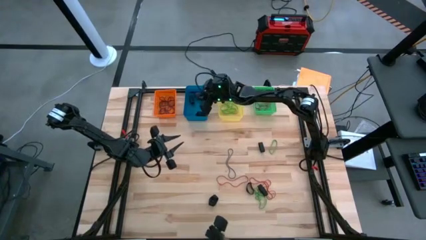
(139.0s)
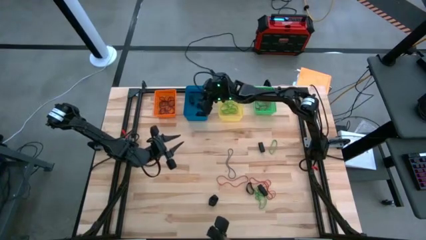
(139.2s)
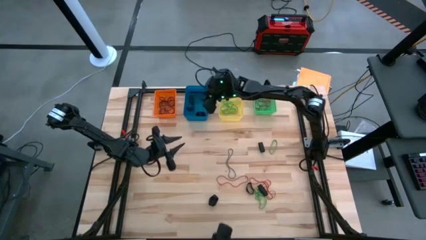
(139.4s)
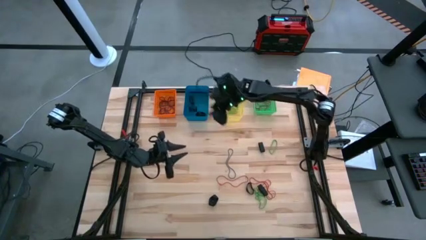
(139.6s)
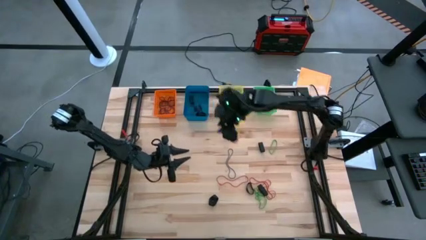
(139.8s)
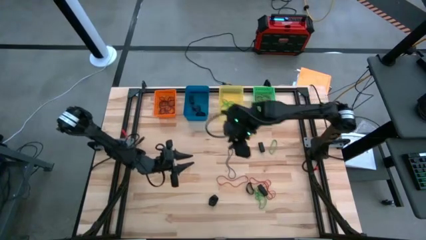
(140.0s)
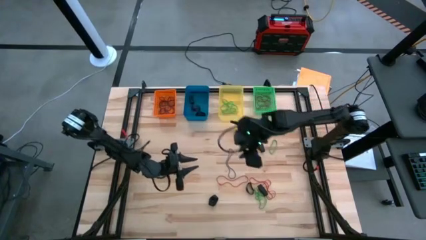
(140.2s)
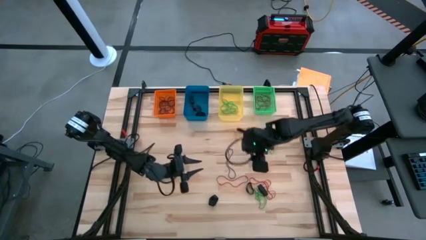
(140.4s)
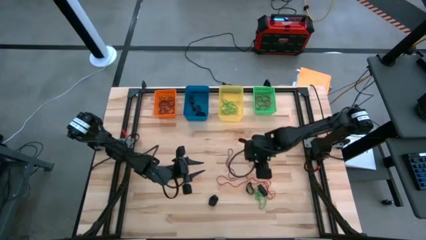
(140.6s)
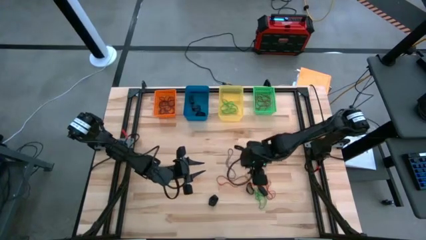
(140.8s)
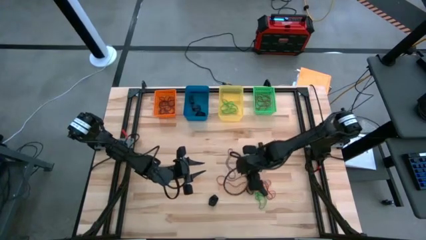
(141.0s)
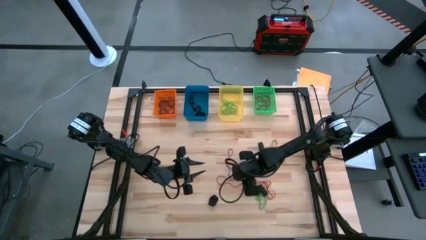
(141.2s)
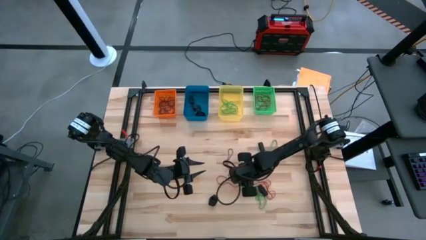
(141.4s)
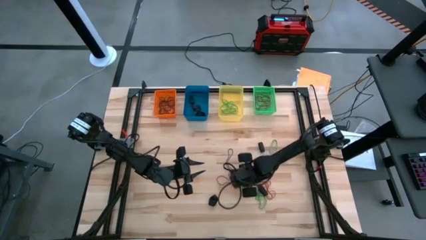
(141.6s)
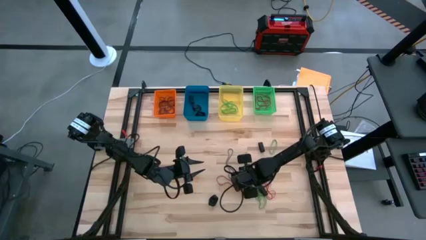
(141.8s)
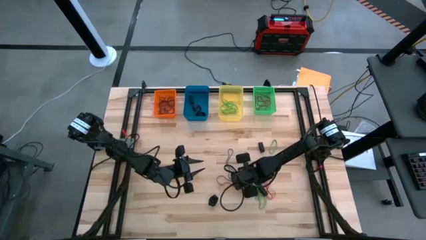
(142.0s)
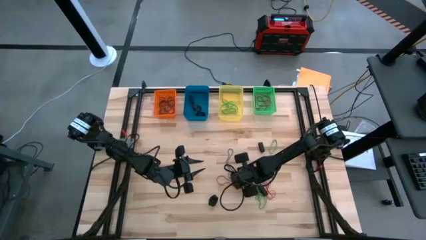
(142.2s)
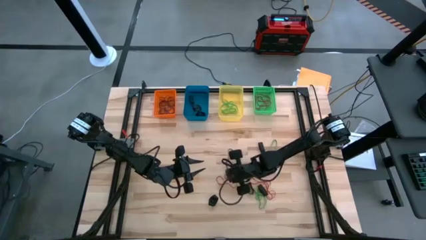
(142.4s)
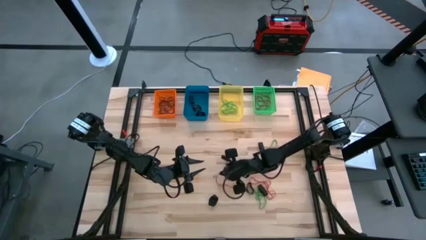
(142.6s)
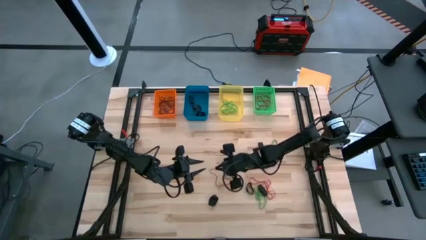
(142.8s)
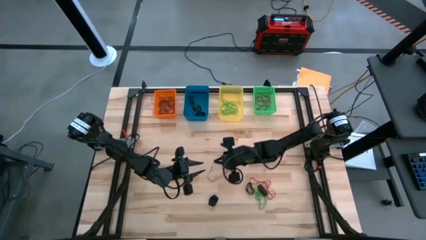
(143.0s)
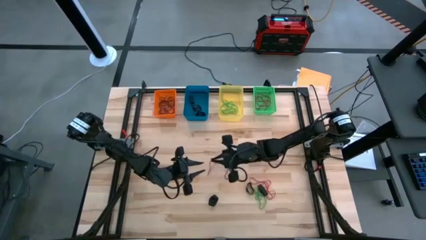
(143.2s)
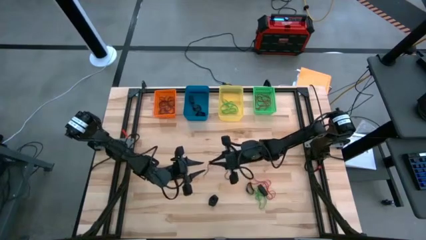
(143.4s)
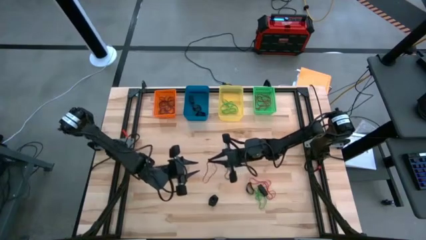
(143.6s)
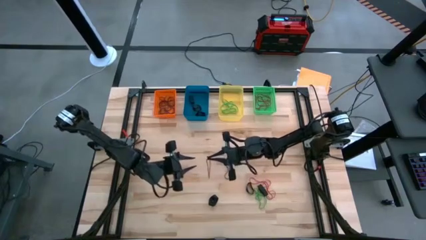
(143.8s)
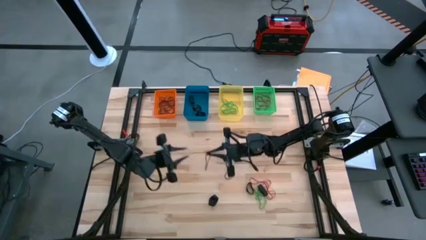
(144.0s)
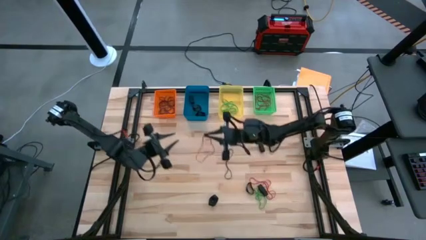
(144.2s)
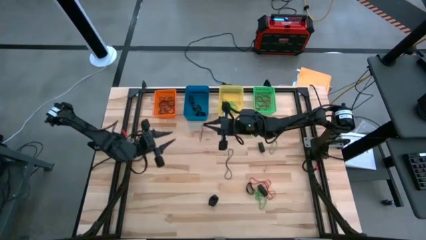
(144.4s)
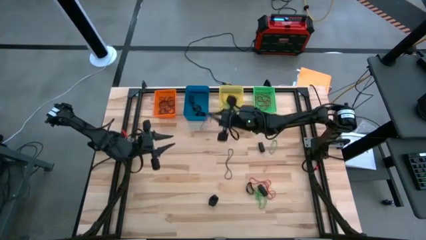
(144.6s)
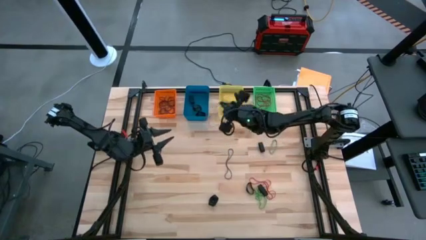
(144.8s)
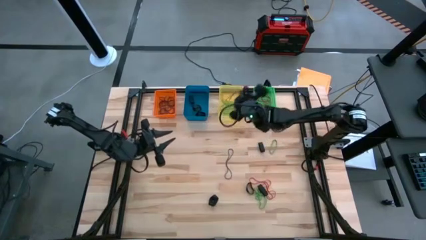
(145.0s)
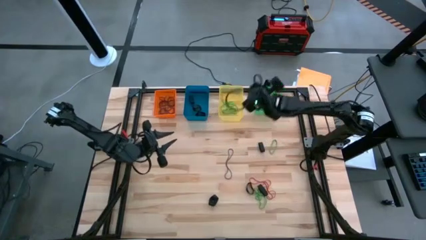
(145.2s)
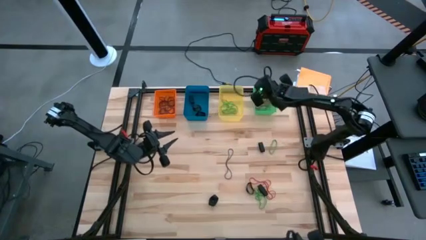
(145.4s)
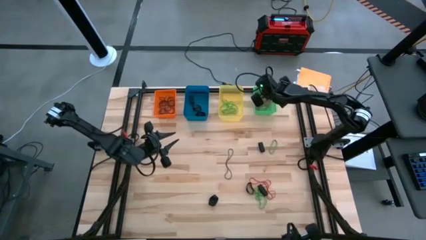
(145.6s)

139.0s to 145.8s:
Task: Sort rubber bands into baskets
Put the red rubber band into the green bin

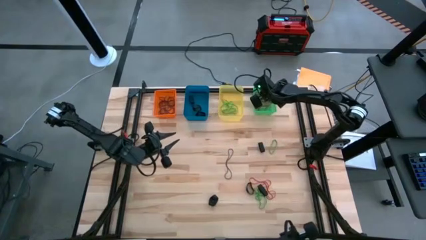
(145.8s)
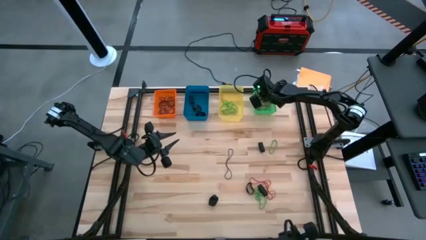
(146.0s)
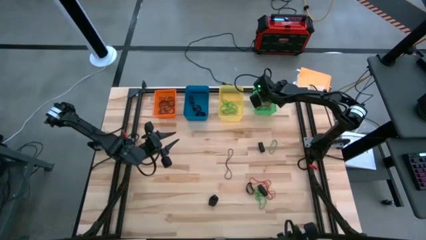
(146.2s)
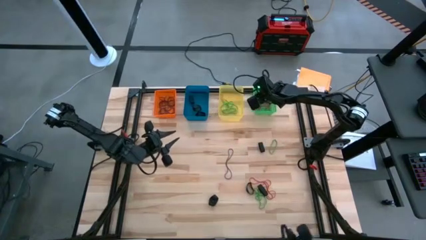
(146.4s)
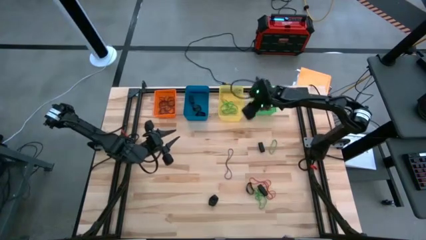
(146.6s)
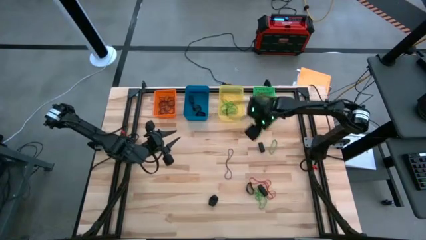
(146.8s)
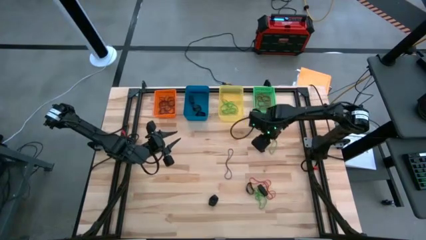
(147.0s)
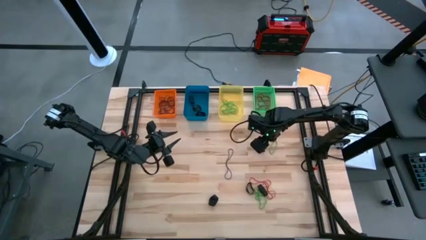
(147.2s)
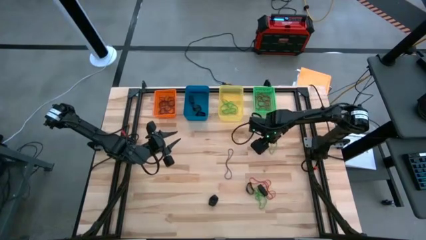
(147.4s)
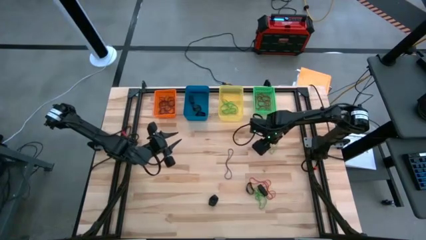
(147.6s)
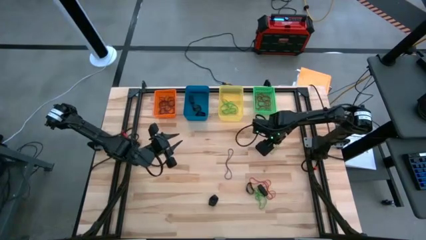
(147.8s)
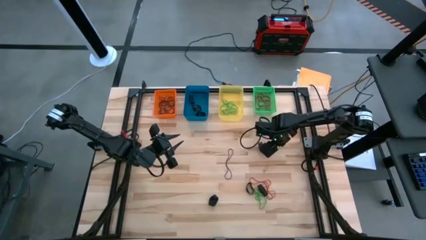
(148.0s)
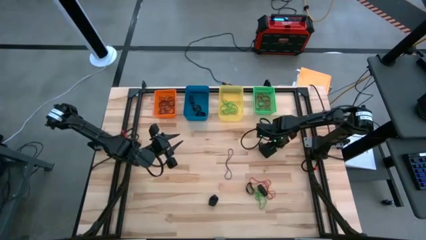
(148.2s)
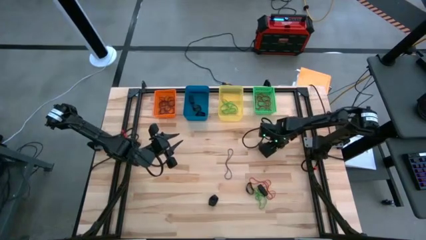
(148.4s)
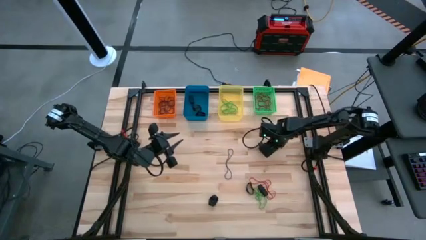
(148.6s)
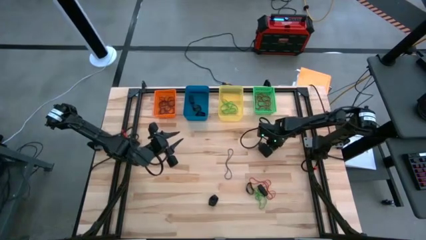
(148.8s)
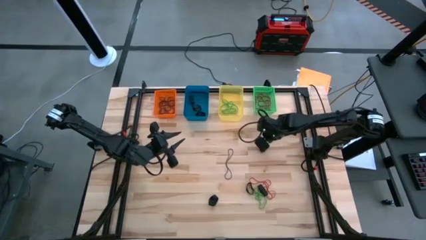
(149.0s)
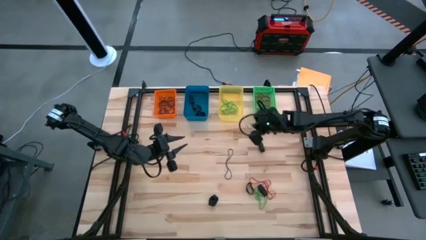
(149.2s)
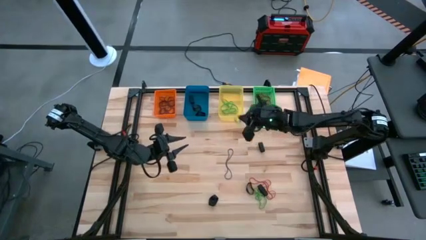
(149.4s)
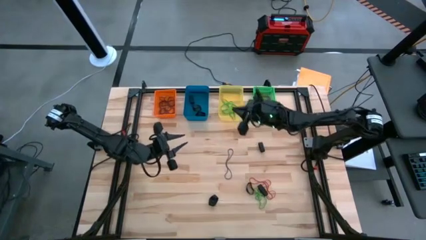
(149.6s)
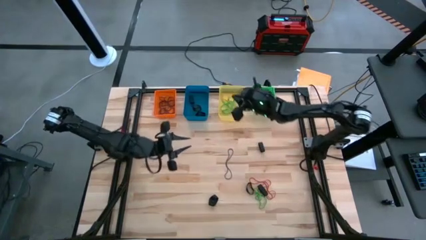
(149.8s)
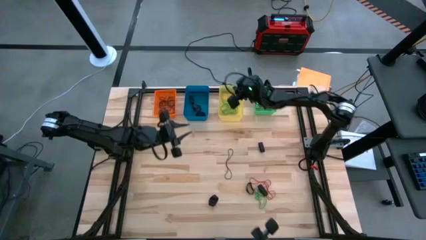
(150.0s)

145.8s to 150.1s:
Put the green rubber band into the yellow bin

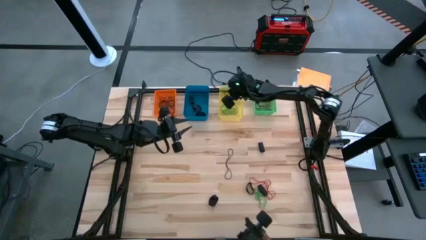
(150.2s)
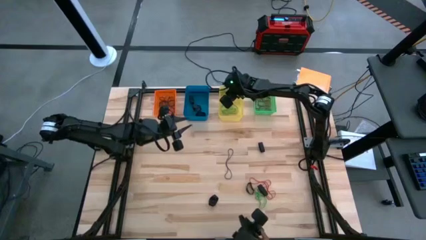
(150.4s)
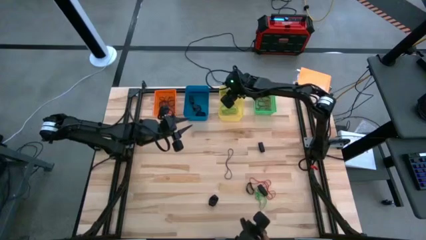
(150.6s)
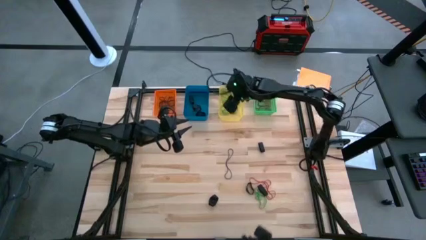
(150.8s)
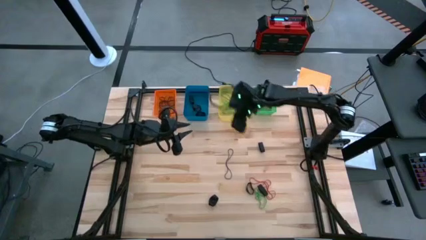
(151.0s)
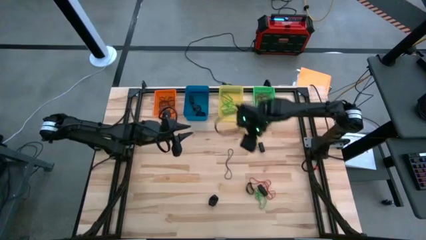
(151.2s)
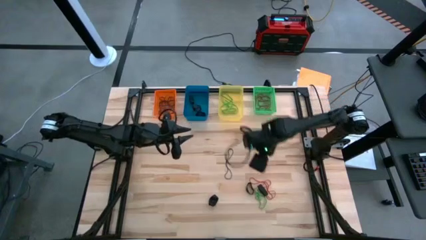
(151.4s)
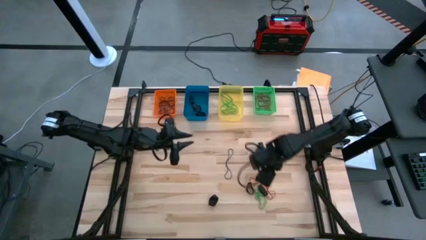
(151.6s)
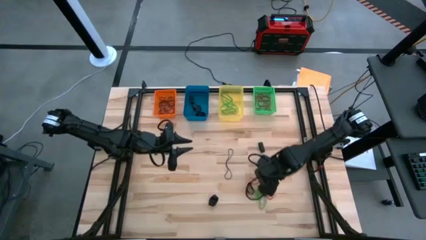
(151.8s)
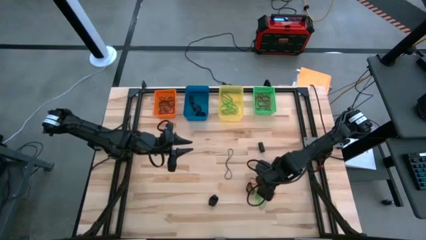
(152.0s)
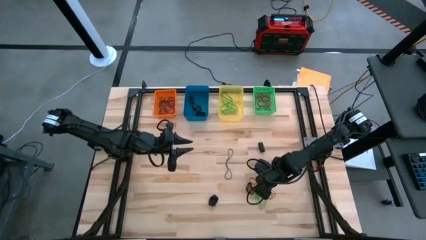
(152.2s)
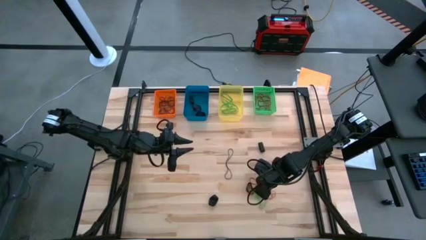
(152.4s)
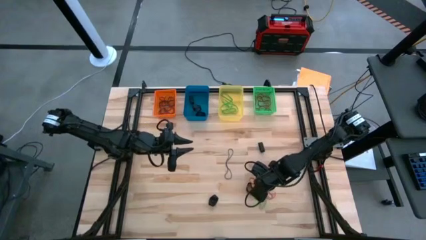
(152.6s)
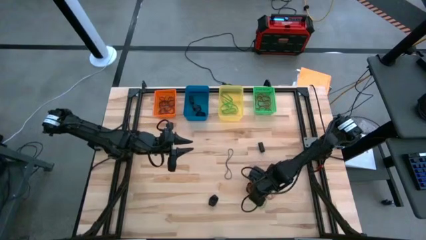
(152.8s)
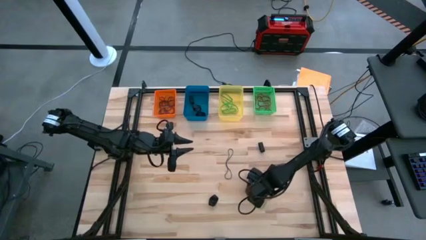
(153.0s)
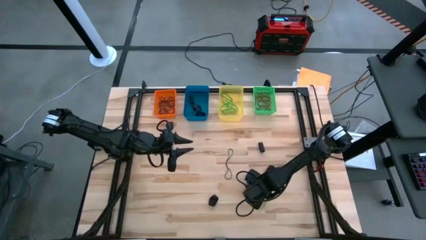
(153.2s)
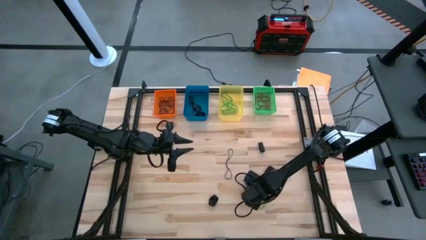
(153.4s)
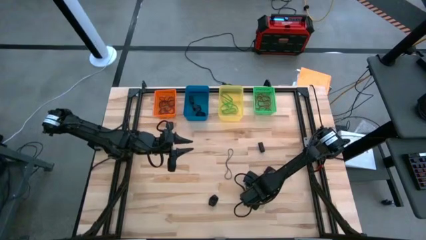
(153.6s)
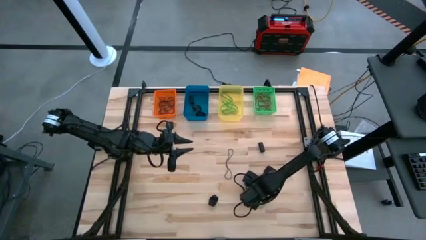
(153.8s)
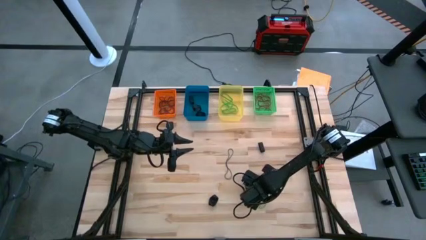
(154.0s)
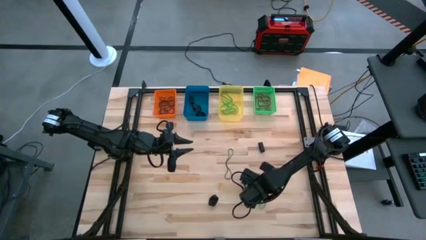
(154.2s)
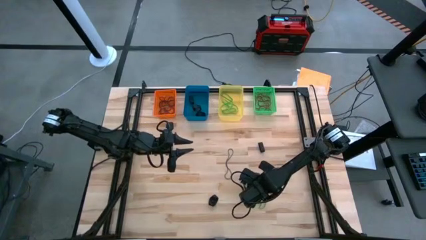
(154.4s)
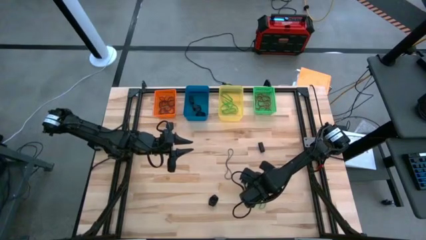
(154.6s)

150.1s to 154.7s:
Put the black rubber band into the blue bin
